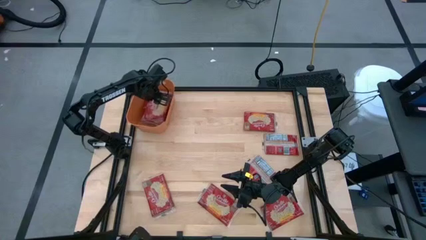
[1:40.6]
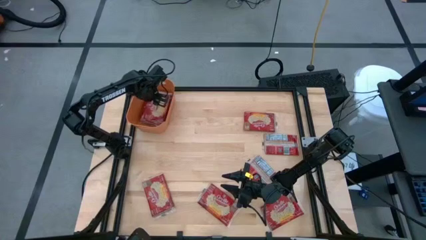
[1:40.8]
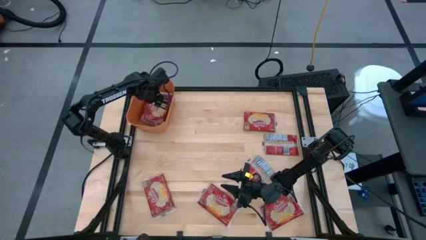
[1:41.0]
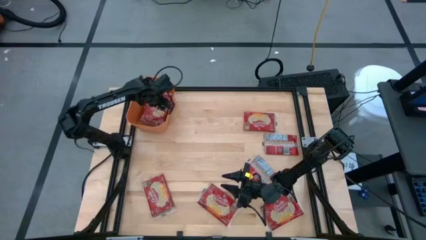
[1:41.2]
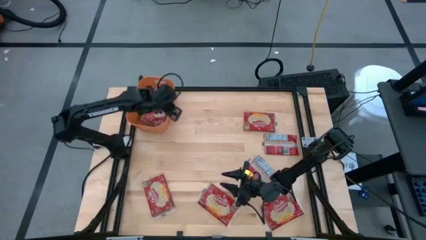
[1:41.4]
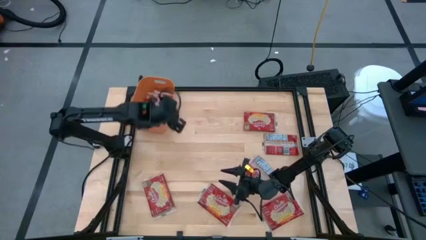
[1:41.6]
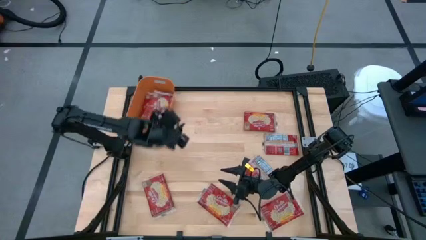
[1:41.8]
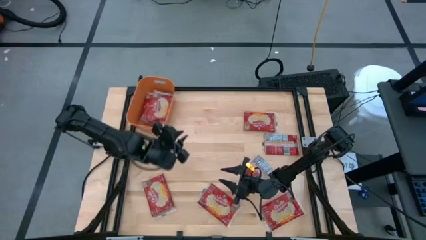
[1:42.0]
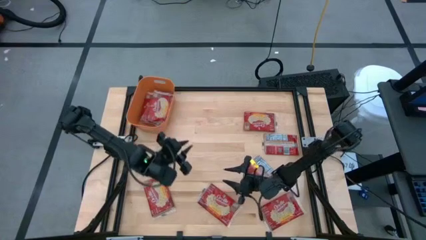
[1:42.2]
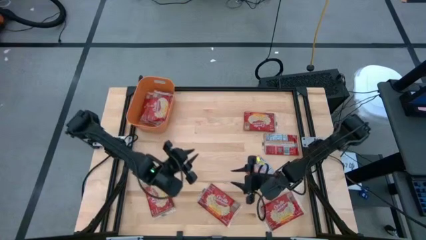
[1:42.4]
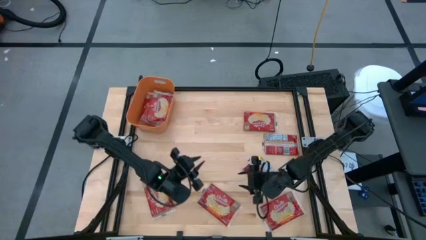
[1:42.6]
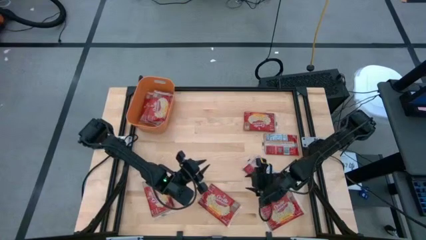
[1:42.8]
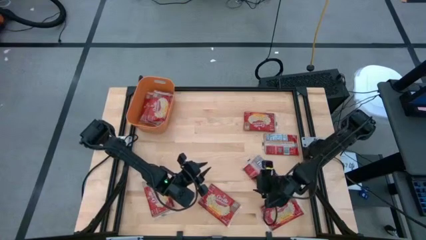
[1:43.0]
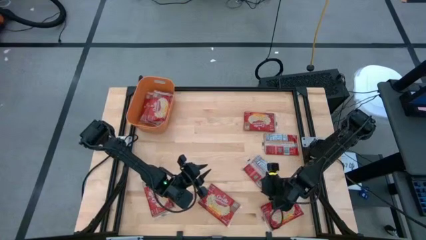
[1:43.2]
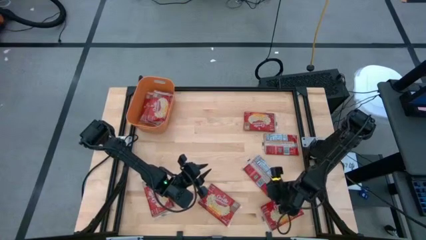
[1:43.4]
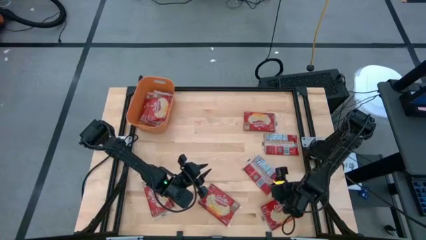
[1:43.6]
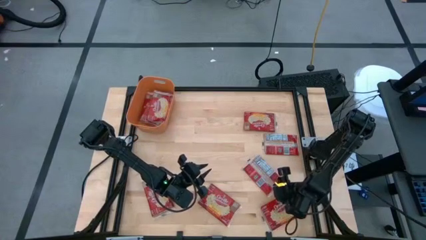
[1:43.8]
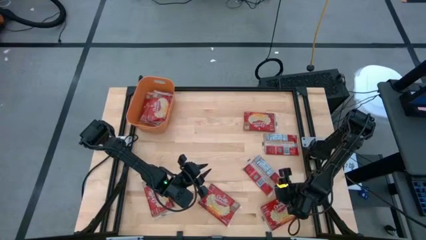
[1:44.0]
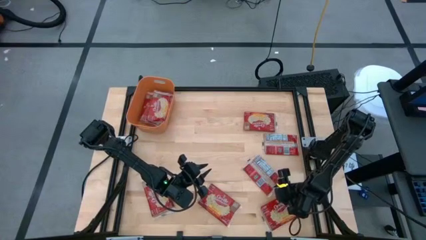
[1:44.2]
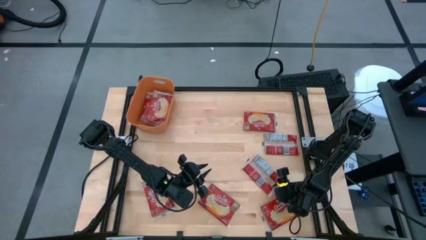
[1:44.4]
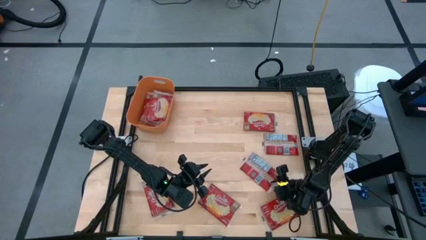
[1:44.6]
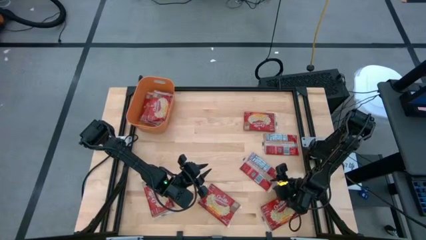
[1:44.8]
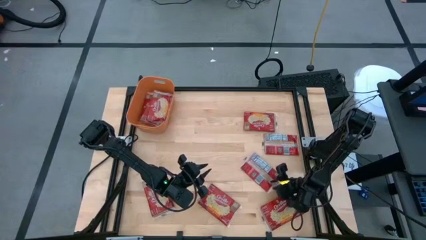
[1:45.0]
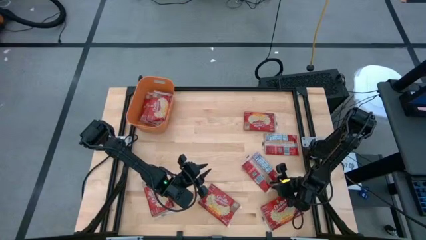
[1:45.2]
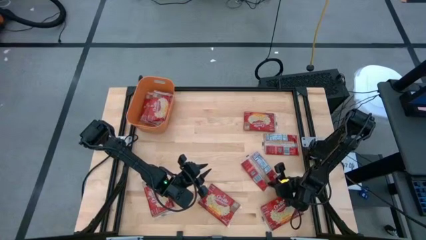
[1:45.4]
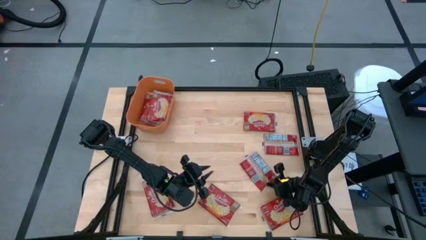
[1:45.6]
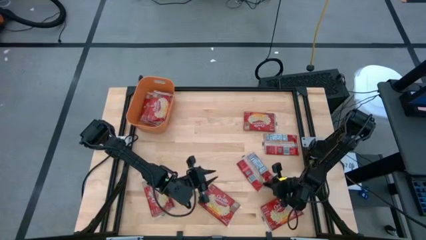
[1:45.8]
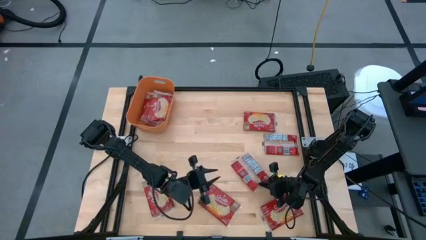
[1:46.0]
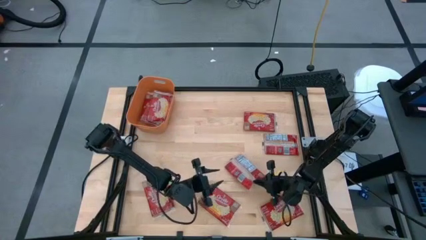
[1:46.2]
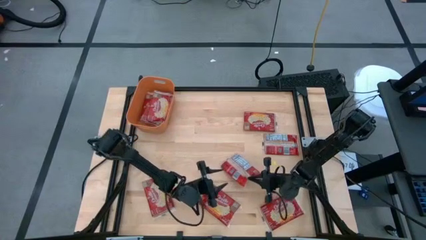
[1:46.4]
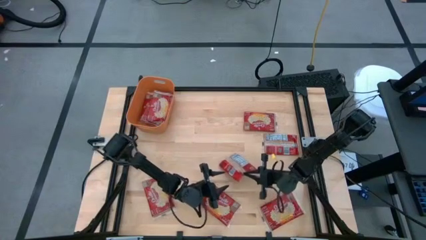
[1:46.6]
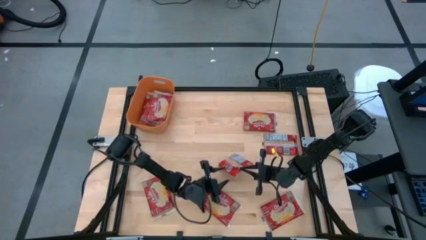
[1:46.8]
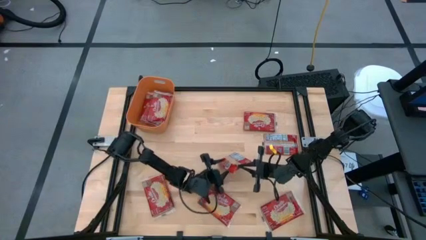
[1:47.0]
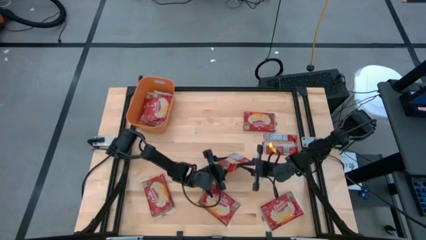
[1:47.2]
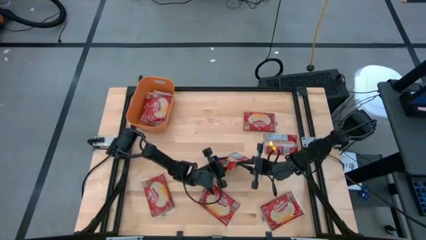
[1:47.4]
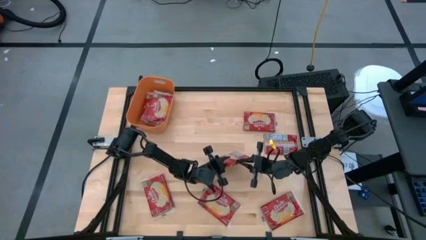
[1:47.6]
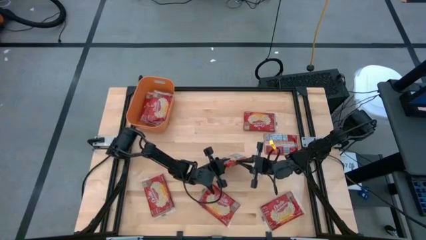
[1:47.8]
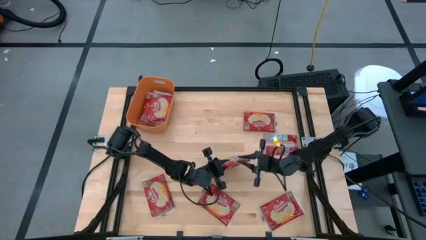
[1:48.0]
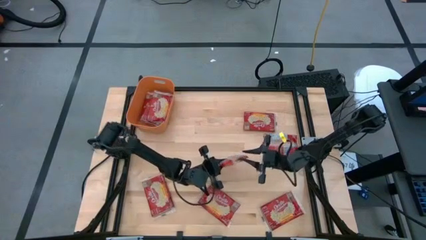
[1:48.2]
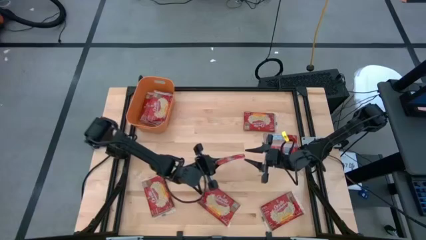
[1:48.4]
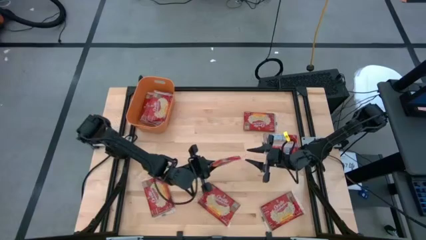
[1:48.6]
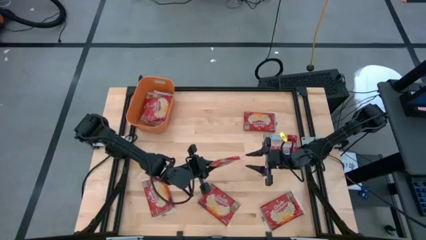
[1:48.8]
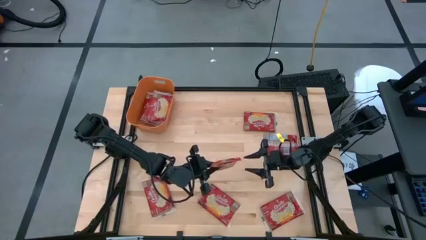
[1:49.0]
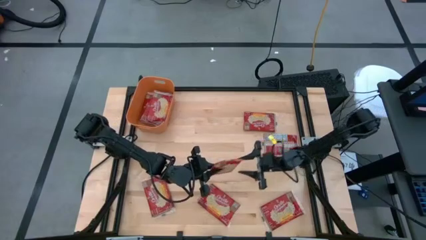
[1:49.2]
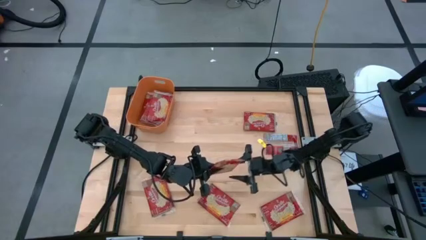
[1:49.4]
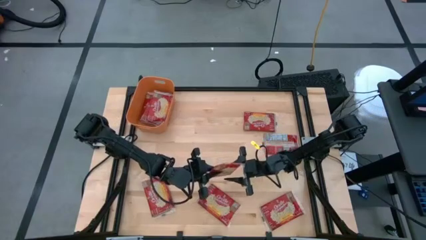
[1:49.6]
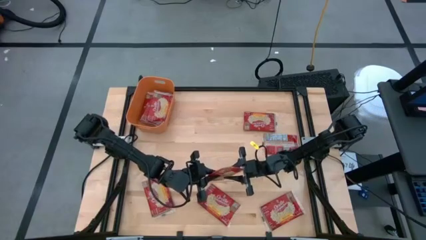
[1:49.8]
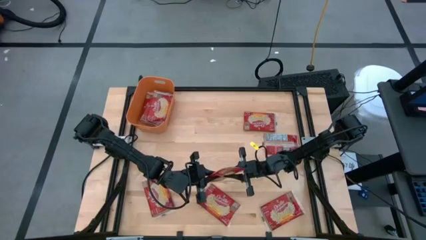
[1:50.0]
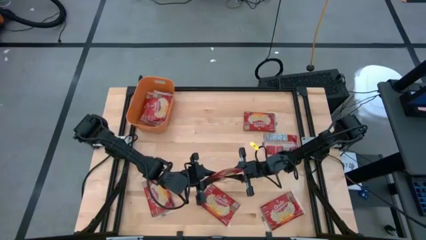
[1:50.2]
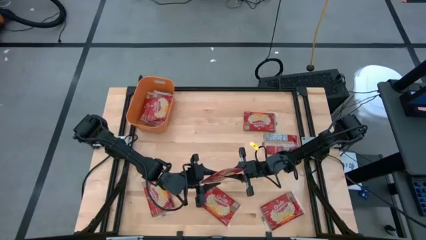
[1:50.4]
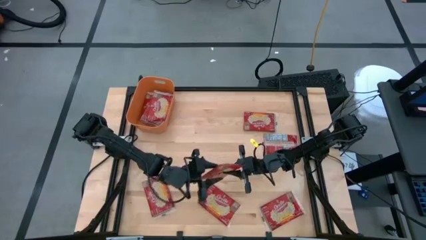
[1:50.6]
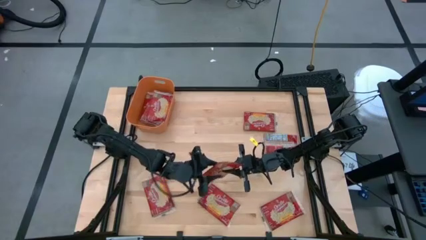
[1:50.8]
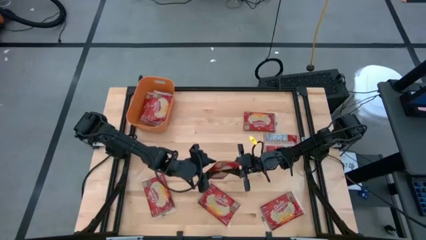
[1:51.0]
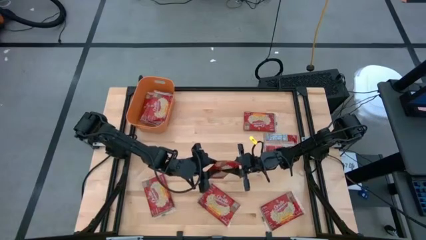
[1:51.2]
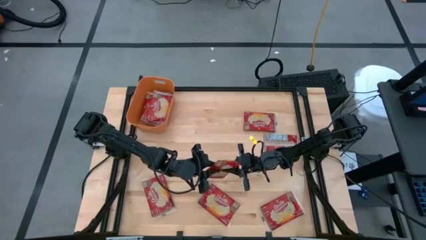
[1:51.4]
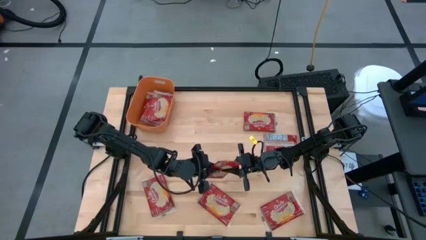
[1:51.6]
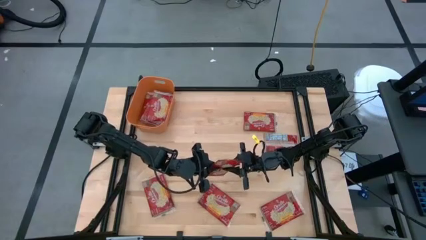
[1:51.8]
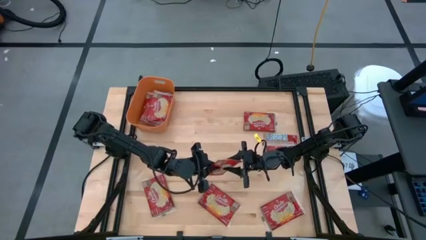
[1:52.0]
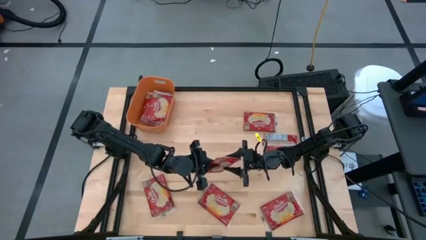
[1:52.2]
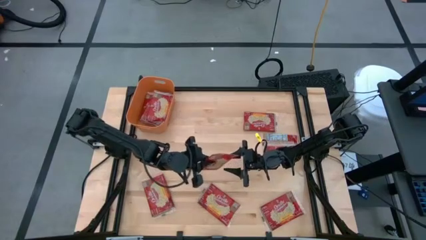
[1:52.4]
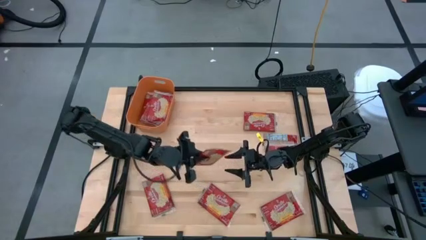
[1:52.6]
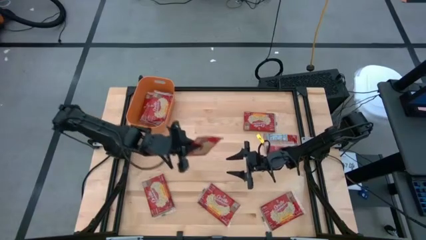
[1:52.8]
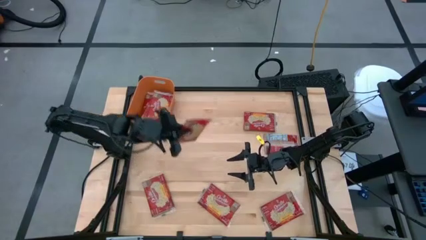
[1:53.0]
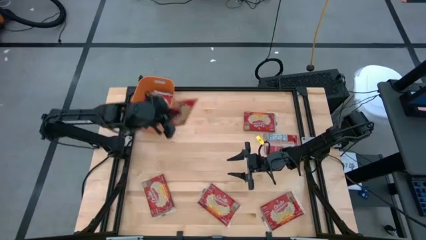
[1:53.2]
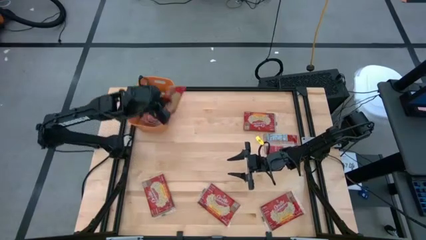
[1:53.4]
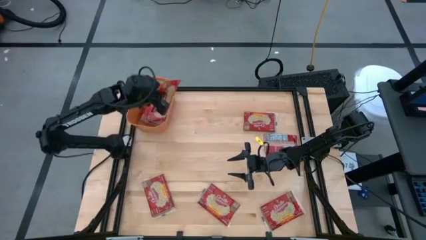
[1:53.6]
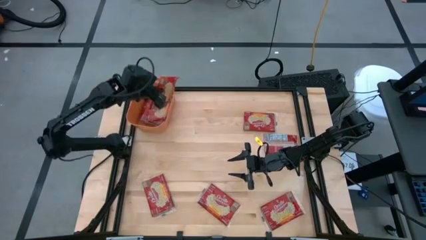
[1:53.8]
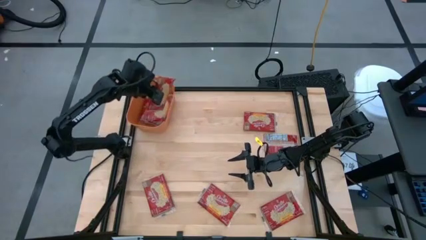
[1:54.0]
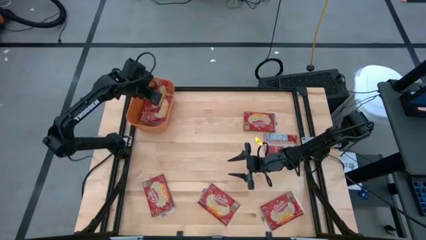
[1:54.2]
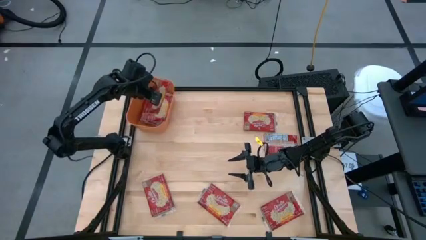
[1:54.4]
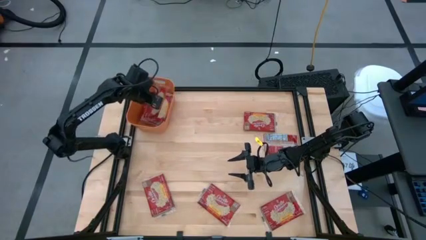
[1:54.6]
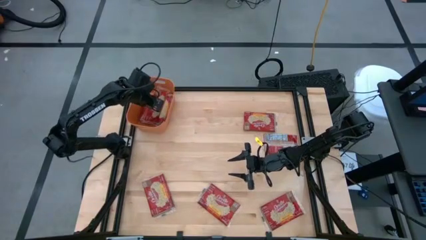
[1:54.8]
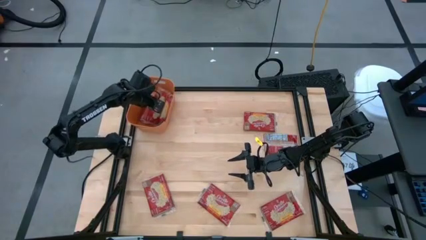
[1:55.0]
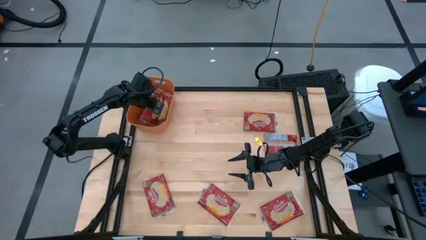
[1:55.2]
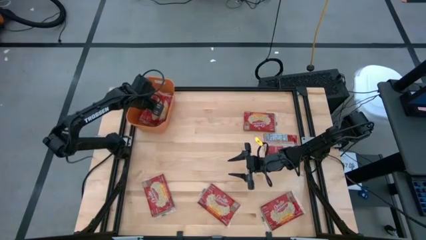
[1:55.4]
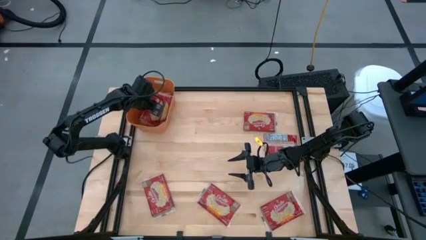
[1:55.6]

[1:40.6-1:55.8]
Task: Sort popcorn bags into baskets
Put the red popcorn bag into the orange bin

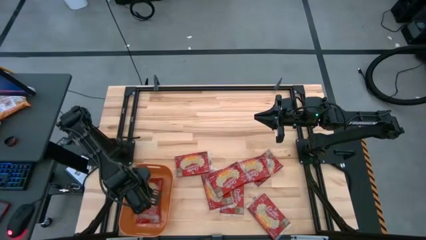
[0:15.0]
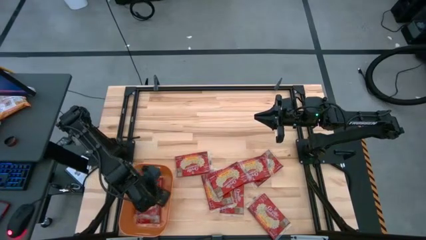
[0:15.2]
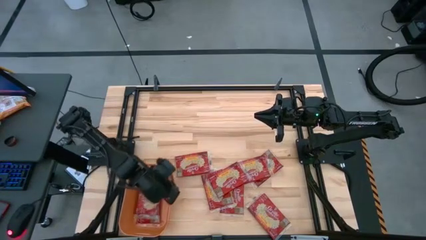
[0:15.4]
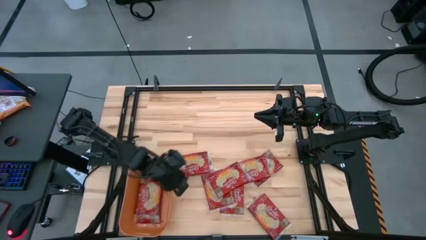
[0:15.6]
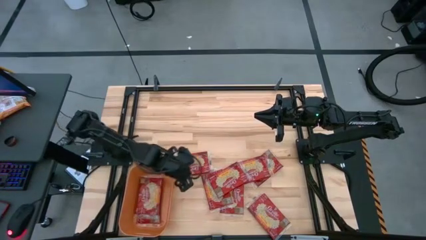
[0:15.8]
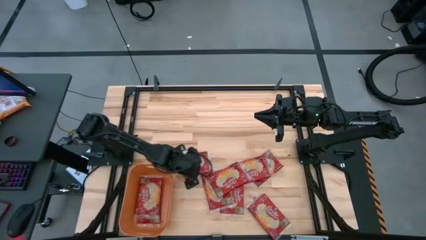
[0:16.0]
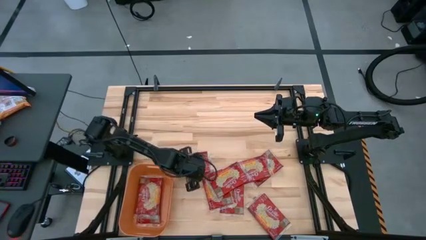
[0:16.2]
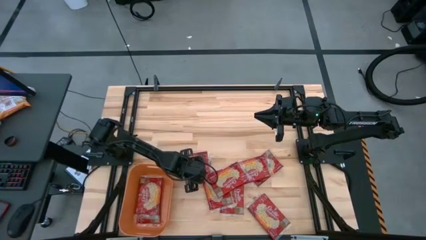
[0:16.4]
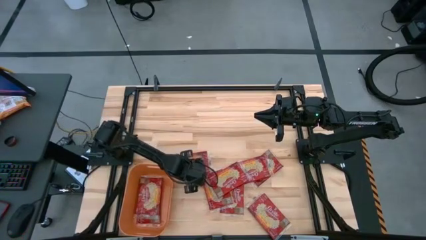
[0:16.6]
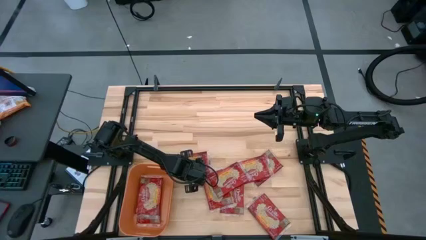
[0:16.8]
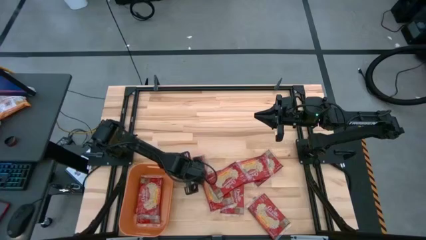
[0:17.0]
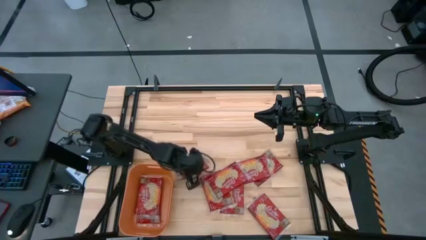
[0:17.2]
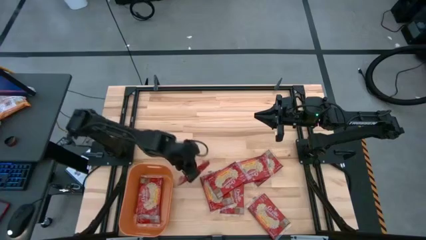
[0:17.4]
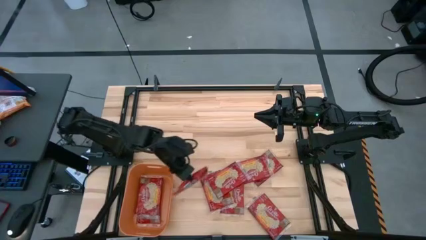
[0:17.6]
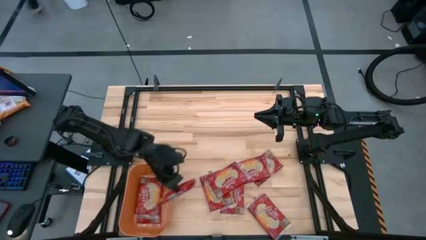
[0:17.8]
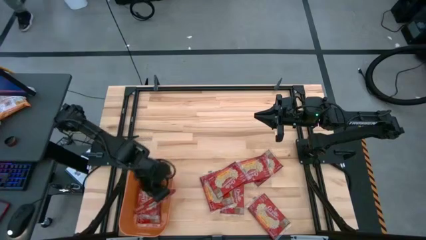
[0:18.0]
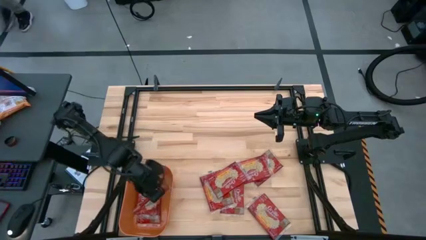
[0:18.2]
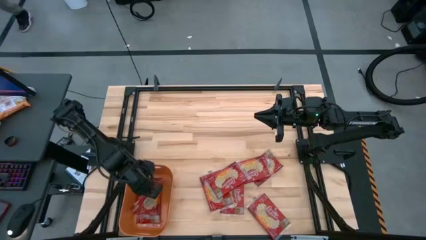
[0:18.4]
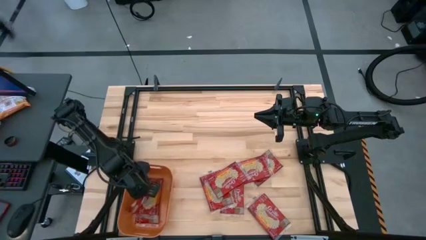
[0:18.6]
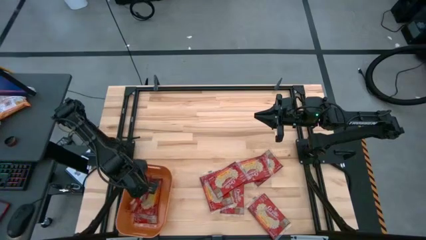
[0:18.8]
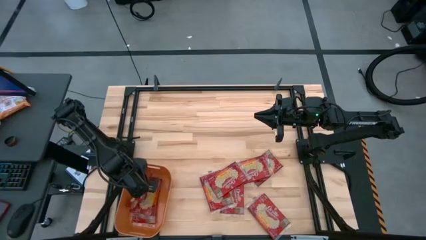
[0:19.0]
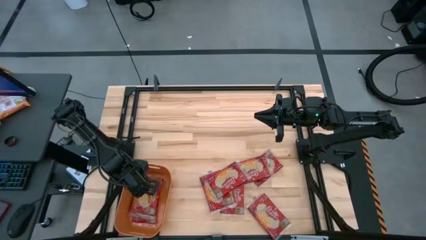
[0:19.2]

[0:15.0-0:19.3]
Task: Sort popcorn bags into baskets
Put the red popcorn bag into the orange container
